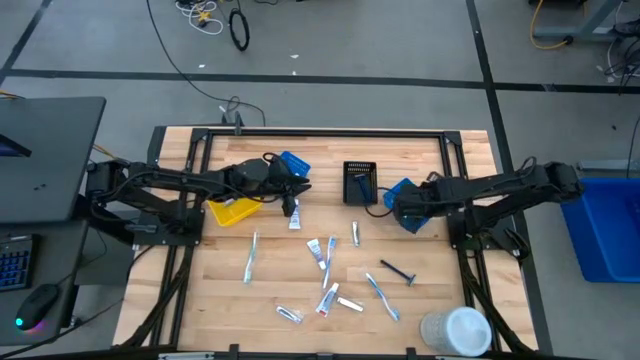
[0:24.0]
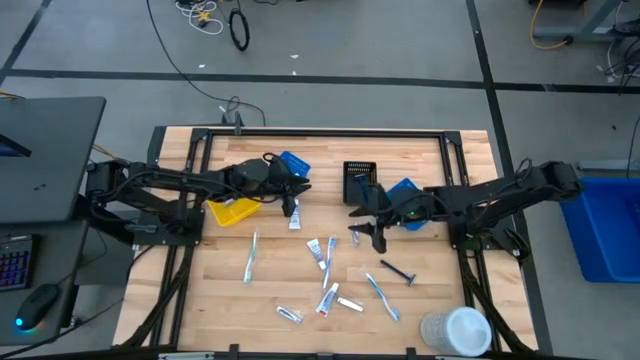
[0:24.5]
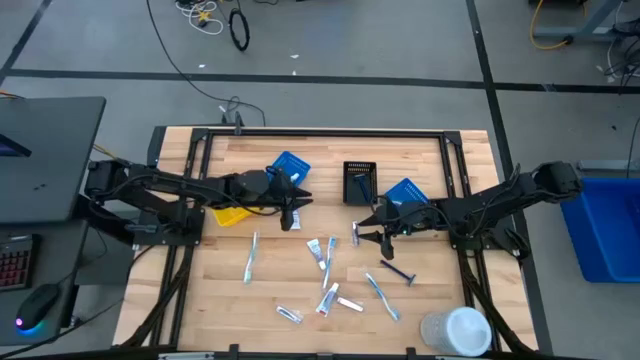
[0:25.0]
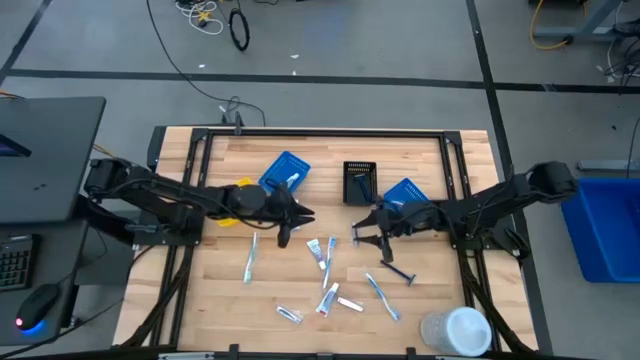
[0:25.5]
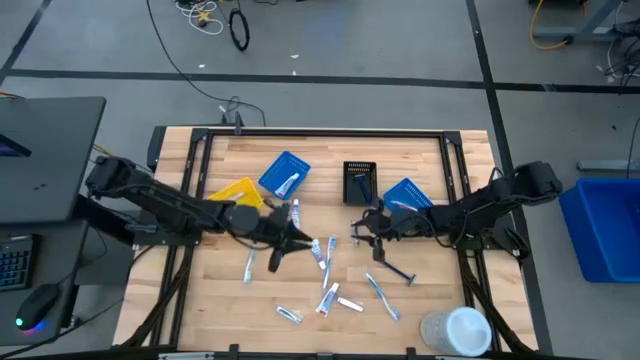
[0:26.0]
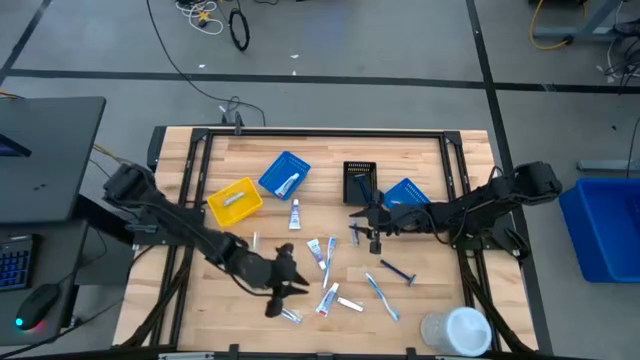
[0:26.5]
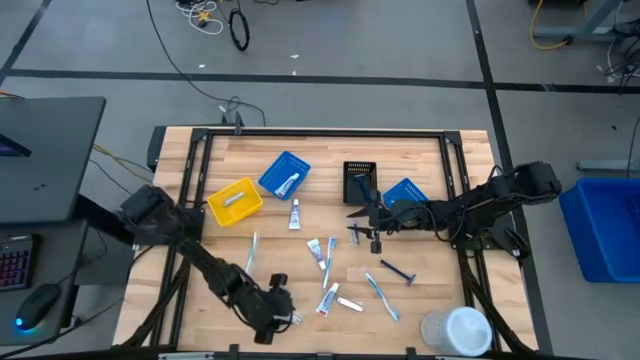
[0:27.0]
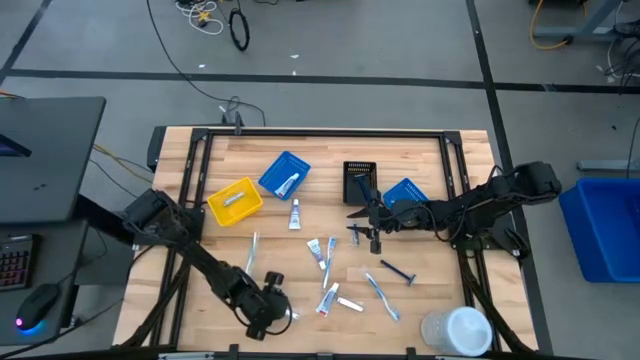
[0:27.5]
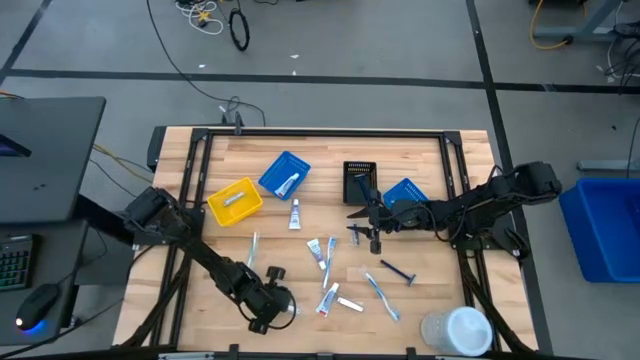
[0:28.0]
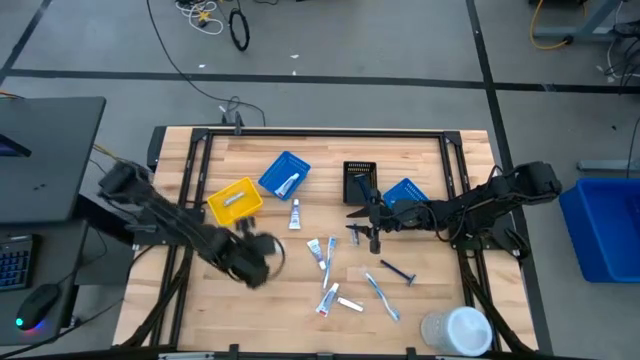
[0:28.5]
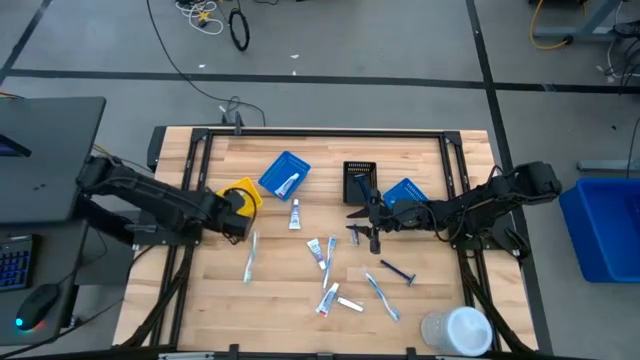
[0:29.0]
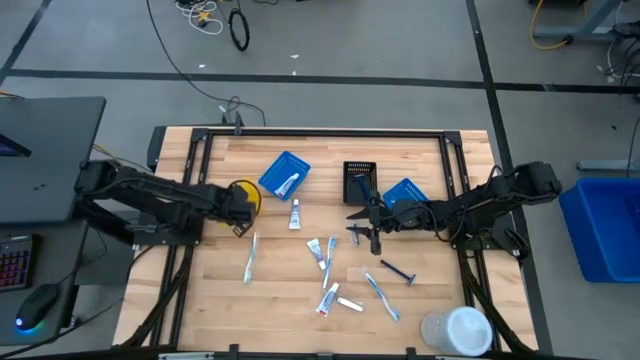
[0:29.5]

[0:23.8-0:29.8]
Task: Pick & Place Travel size toiletries
Put the silver nail cutter into the yellow bin

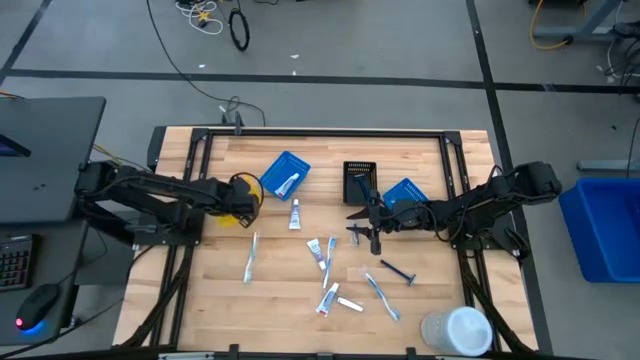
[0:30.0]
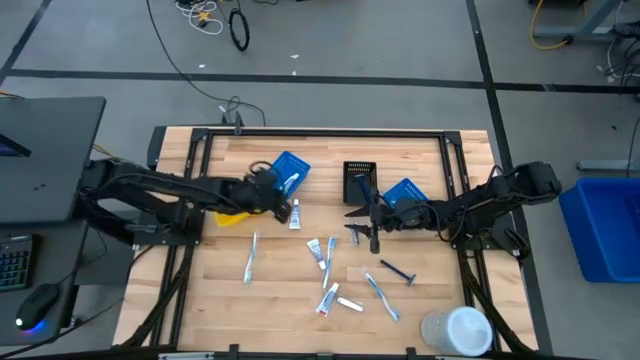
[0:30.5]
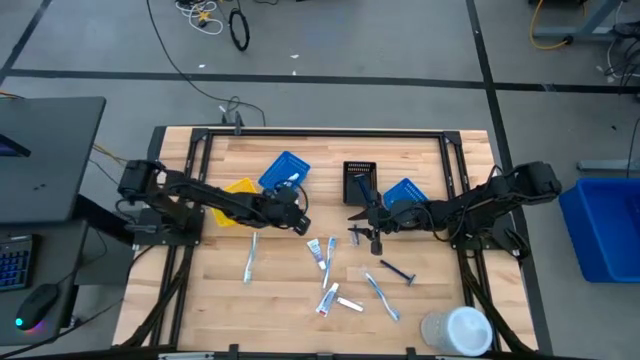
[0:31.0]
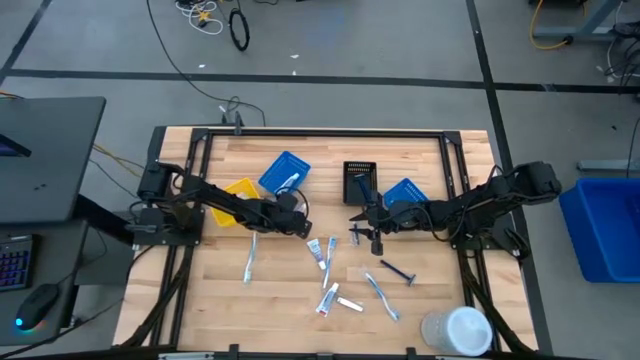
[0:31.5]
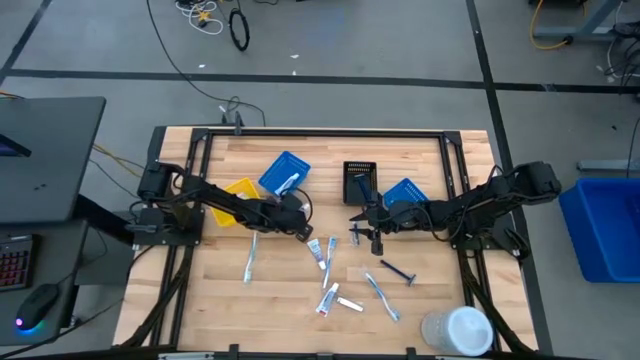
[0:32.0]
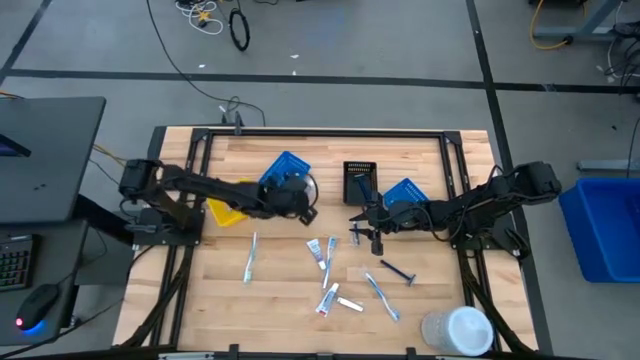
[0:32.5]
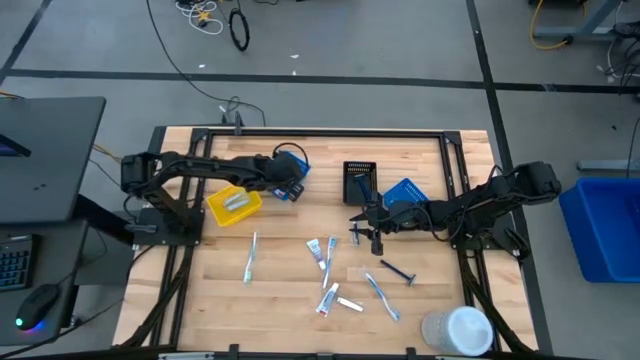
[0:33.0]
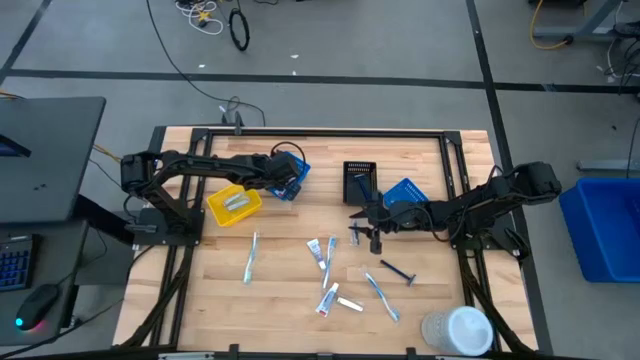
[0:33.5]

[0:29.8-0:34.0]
Put the violet toothpaste into the left blue bin

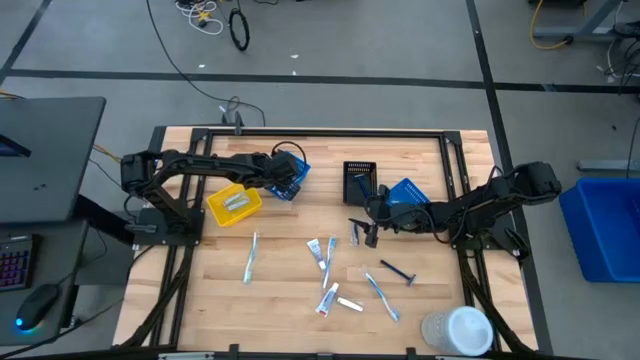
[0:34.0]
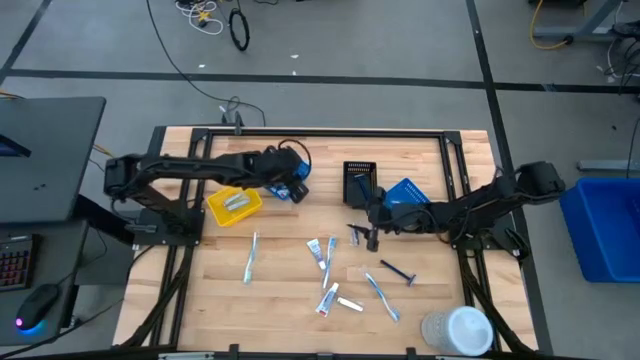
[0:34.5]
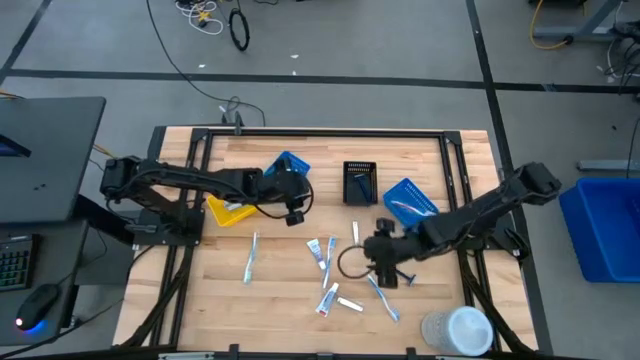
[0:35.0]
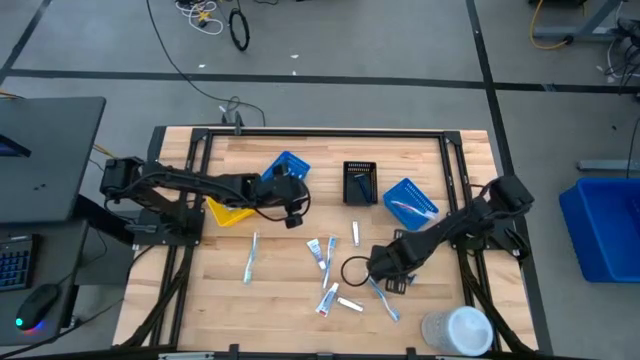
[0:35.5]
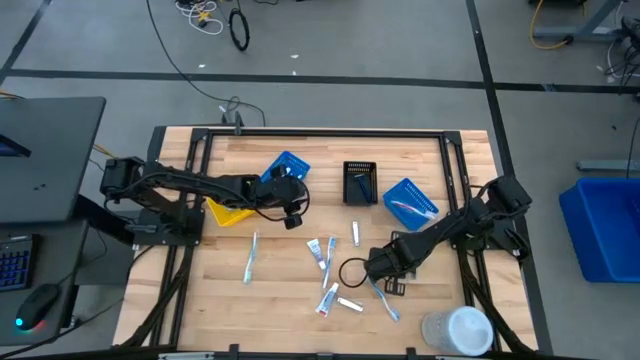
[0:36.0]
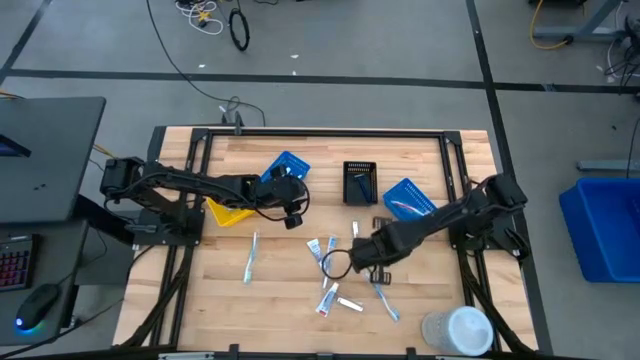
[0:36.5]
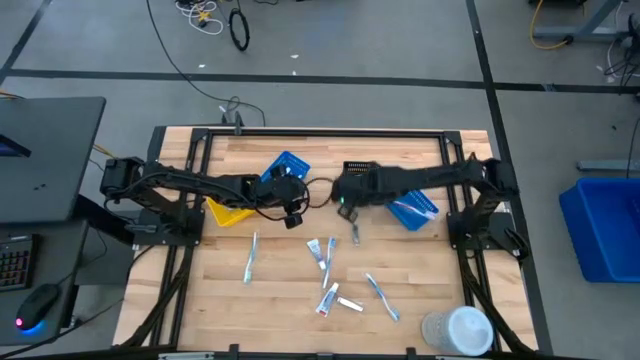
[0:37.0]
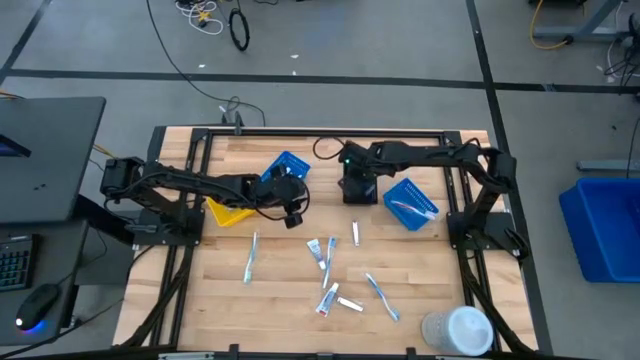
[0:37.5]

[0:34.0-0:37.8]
Put the blue razor into the black bin

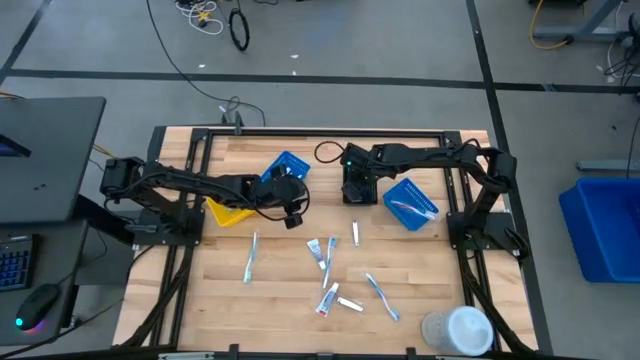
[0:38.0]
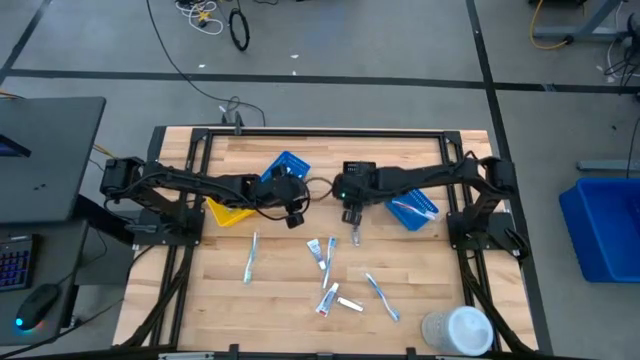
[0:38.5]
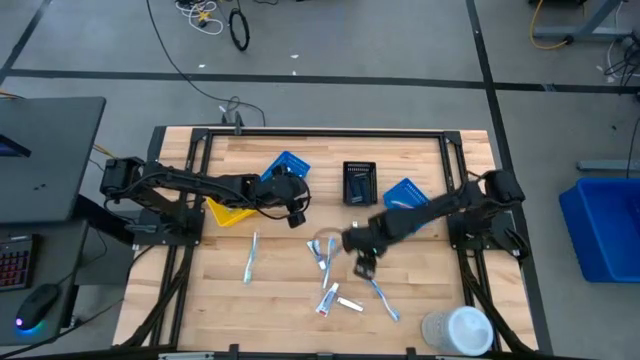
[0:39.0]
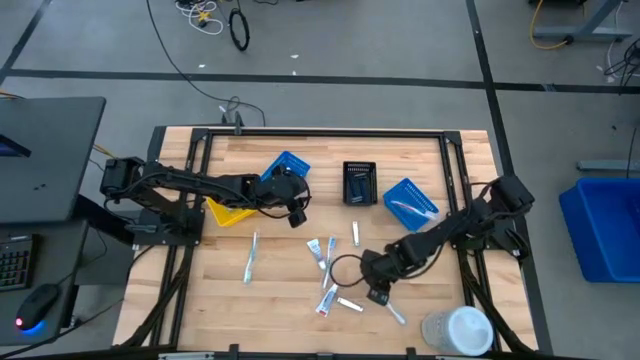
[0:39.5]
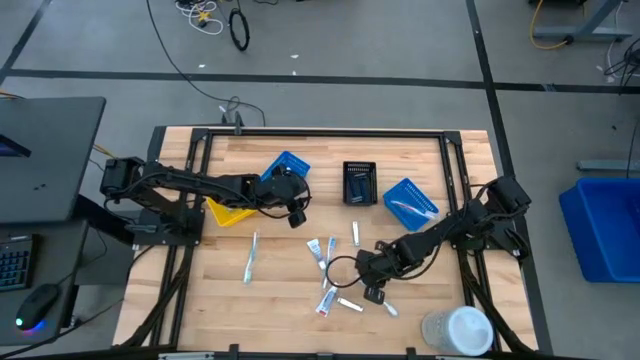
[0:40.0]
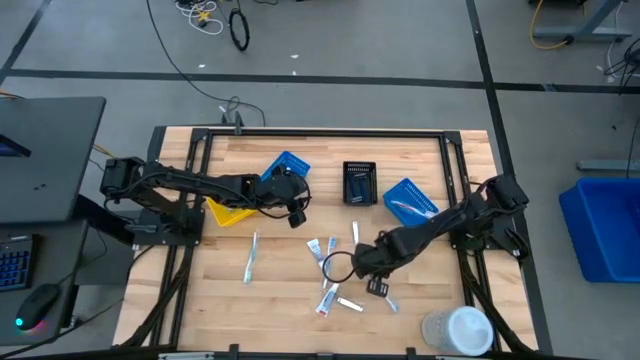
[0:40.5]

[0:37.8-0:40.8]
Put the blue toothbrush into the right blue bin

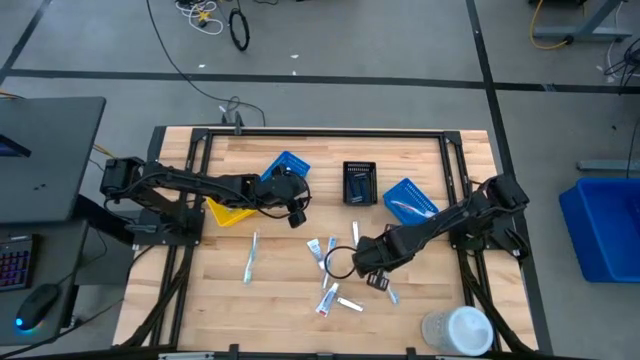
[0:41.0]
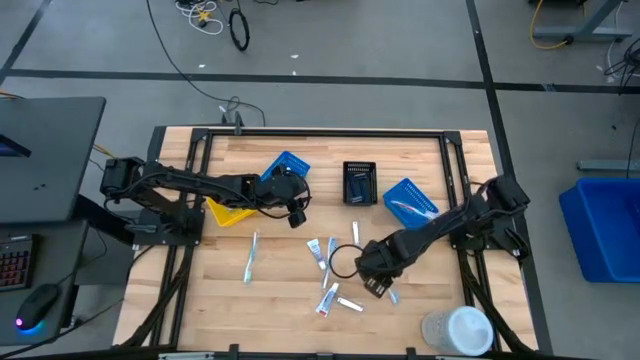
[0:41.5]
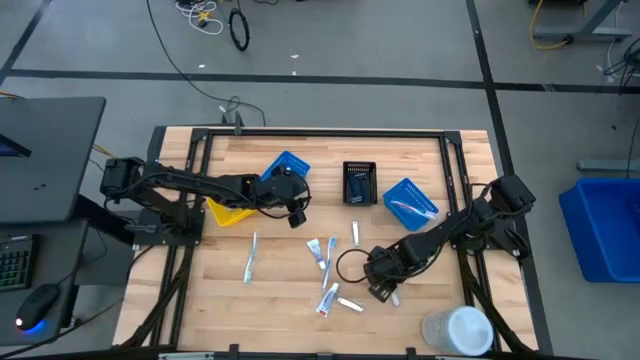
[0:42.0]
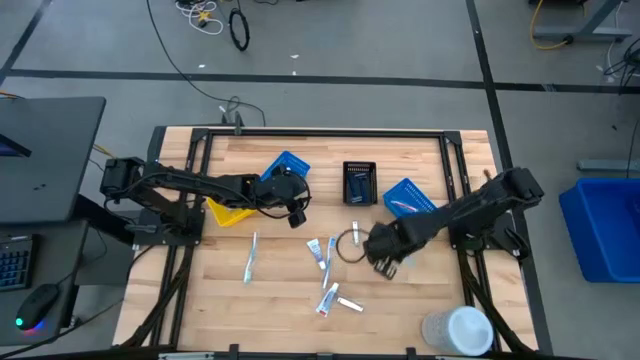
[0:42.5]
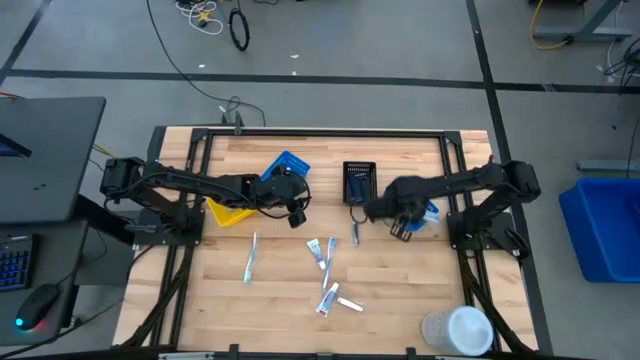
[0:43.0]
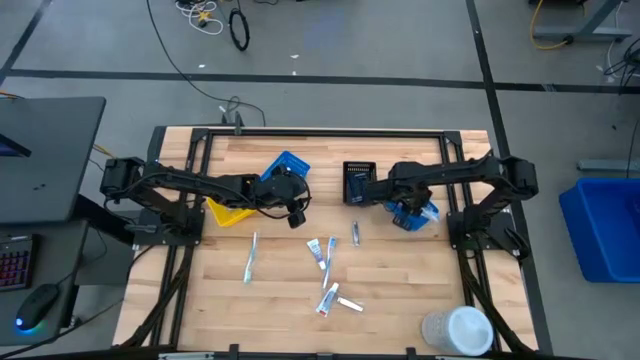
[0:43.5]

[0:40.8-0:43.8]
Put the blue toothbrush into the right blue bin

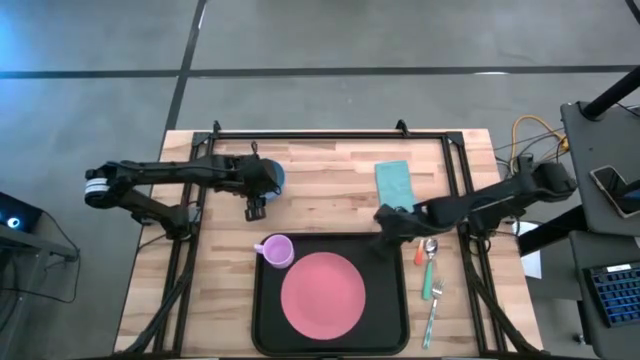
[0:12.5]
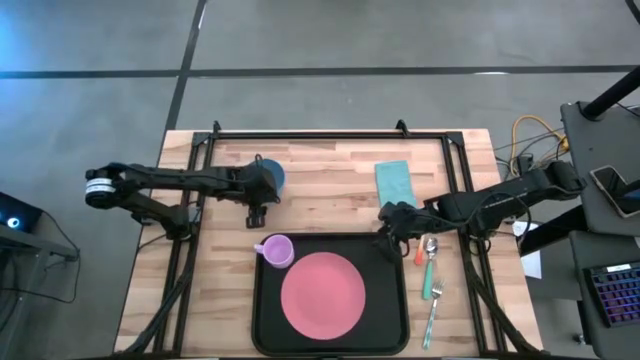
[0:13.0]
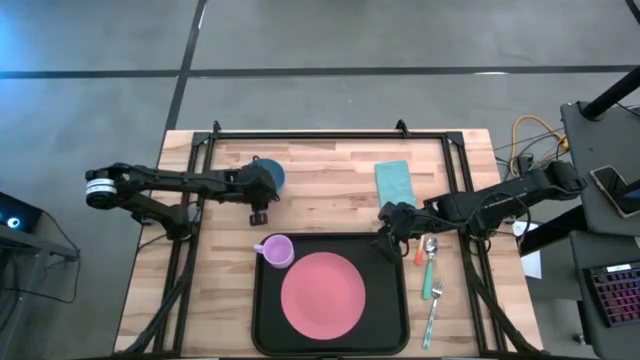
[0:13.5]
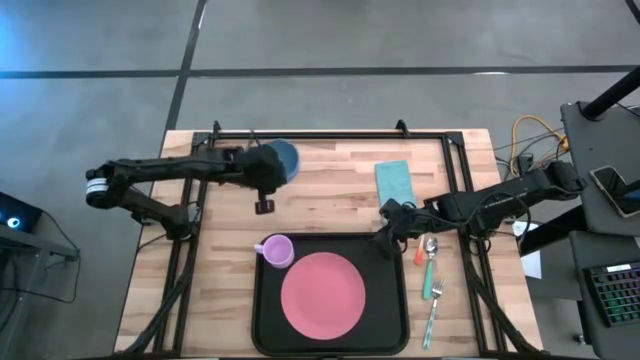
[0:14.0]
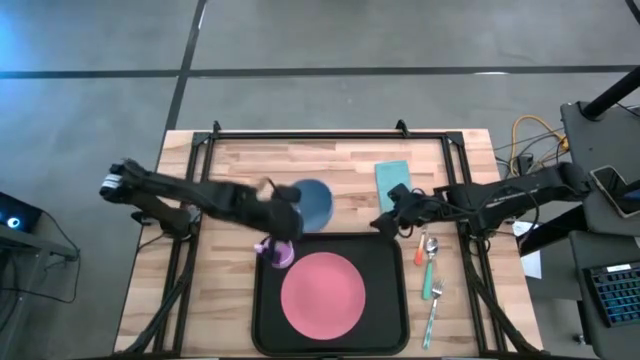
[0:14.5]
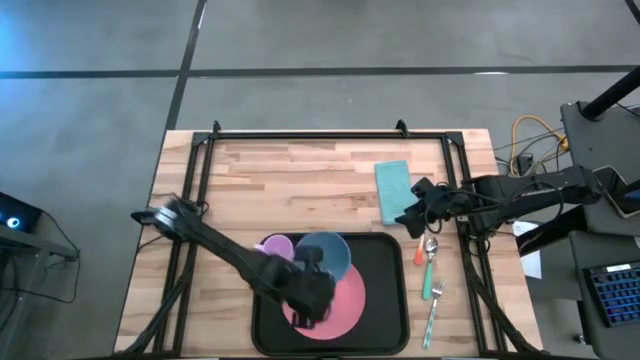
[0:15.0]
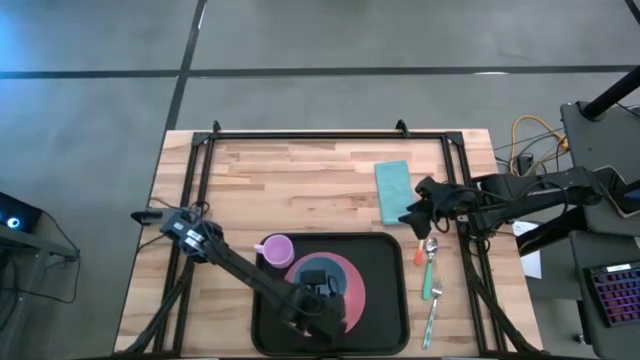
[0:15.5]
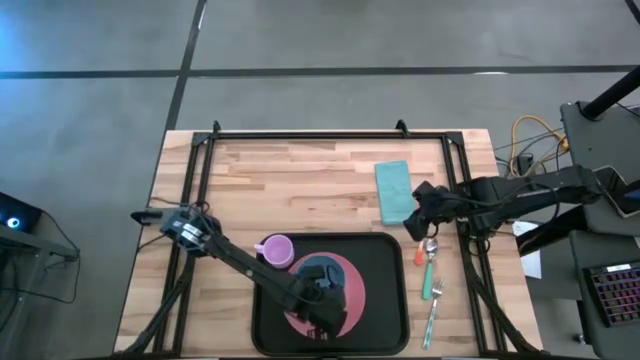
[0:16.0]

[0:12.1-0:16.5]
Task: Set up tray
Put the blue bowl on the pink plate
